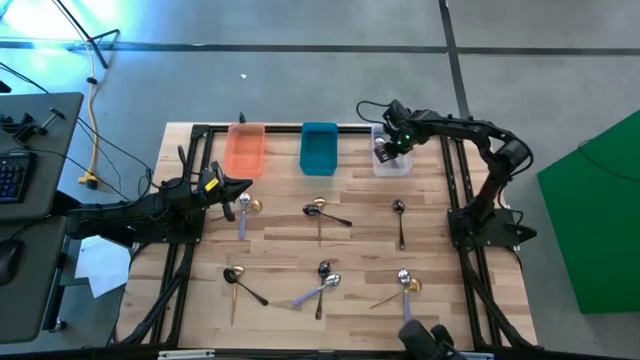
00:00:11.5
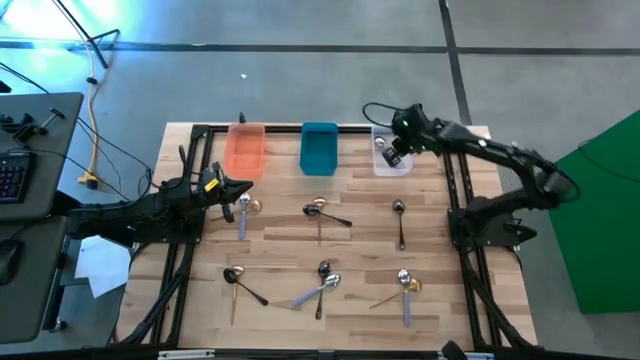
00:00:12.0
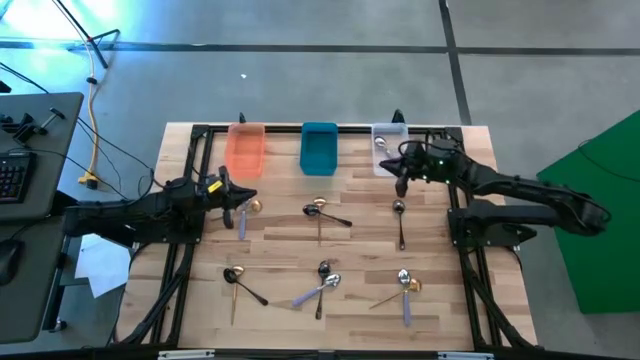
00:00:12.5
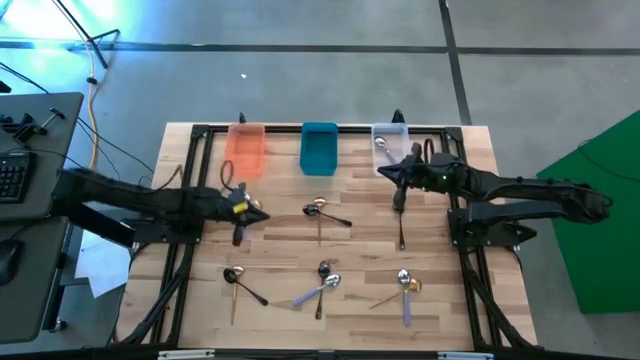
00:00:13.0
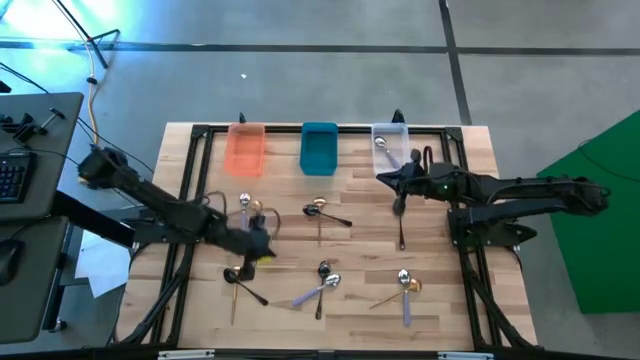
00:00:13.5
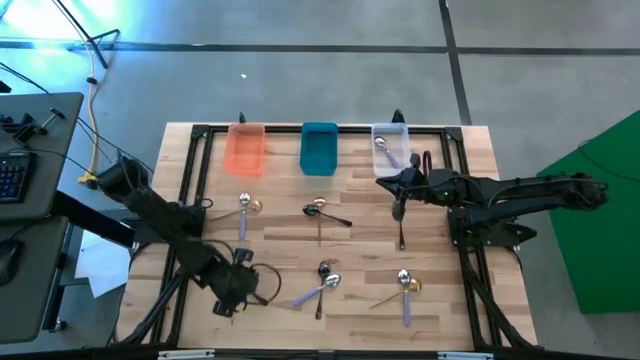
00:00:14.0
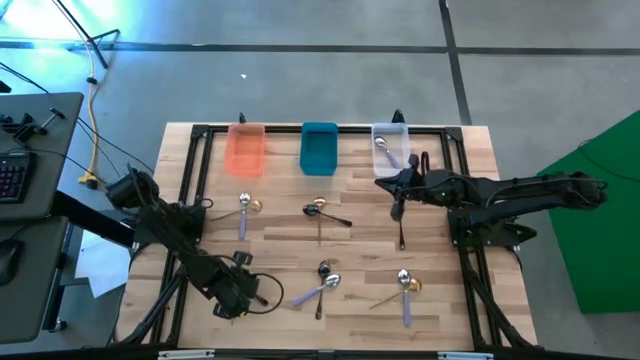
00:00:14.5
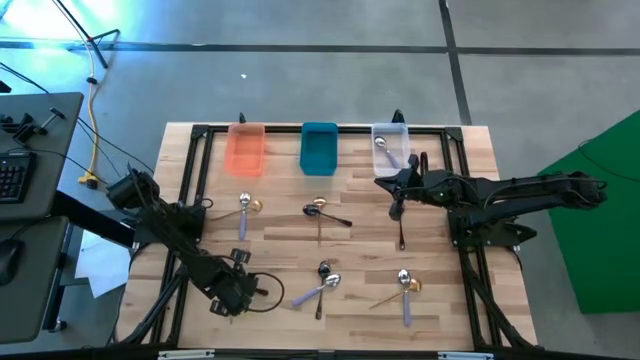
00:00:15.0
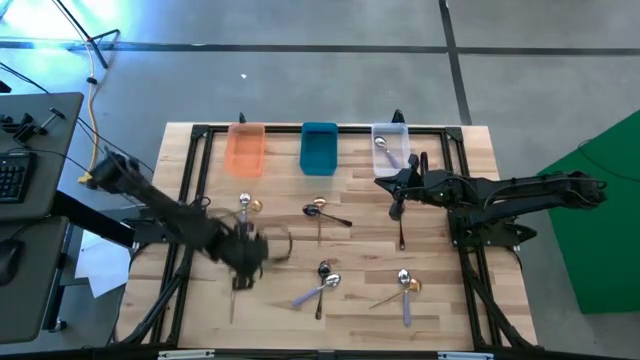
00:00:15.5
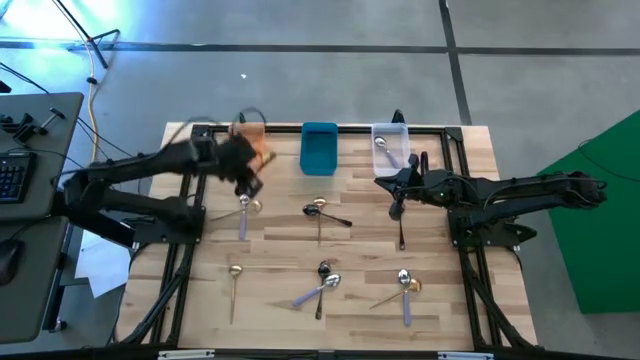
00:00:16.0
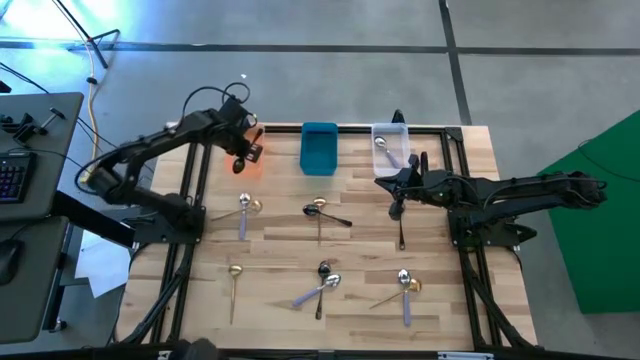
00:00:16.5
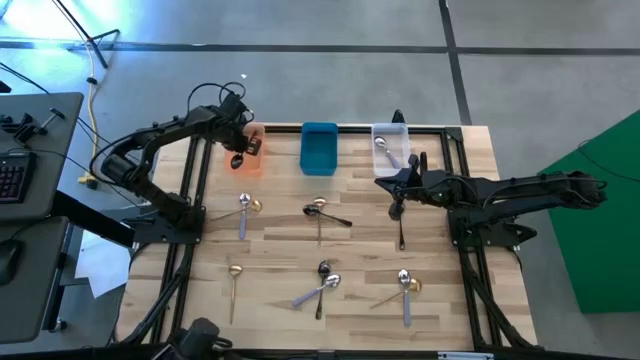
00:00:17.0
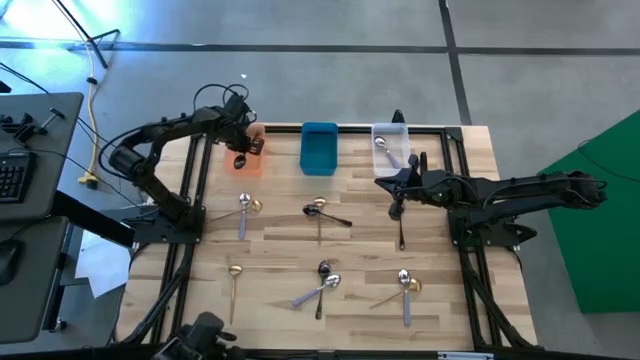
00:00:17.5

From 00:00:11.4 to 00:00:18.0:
Task: Sort silverware by color (type)
Put the bottom left black spoon into the orange bin

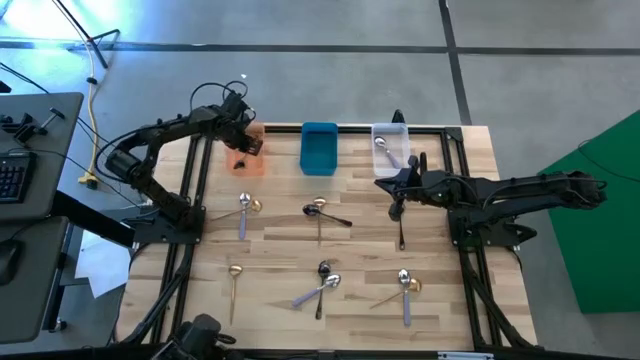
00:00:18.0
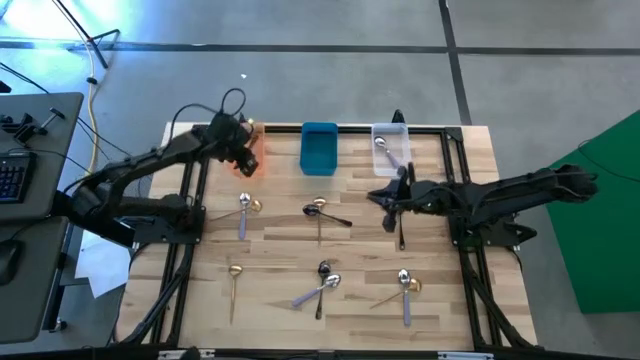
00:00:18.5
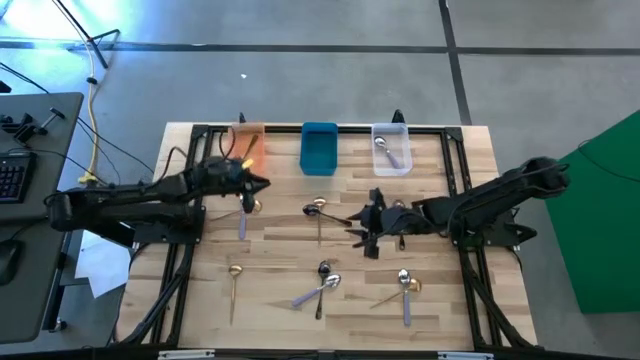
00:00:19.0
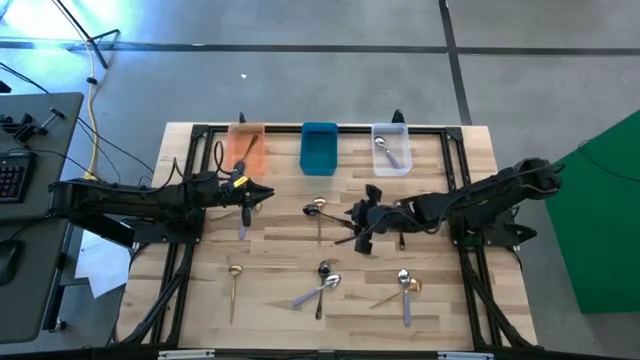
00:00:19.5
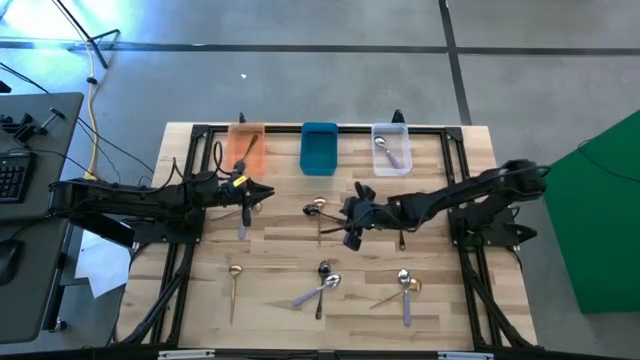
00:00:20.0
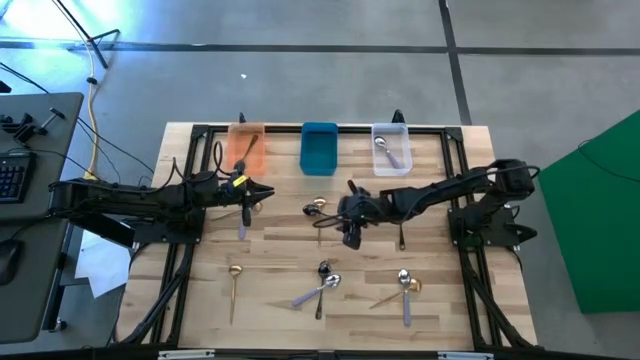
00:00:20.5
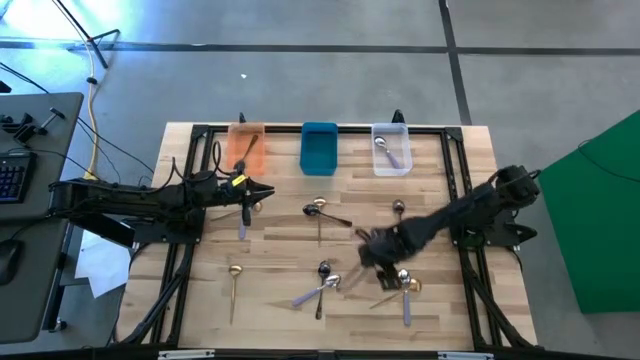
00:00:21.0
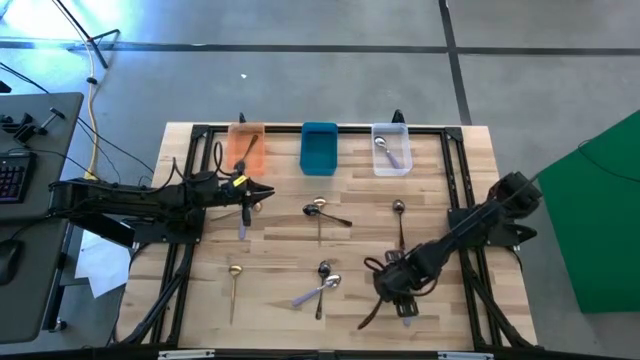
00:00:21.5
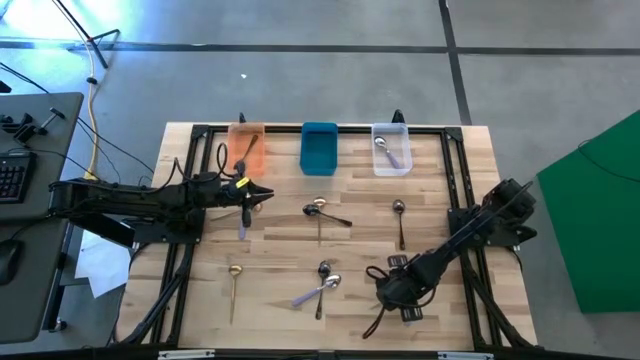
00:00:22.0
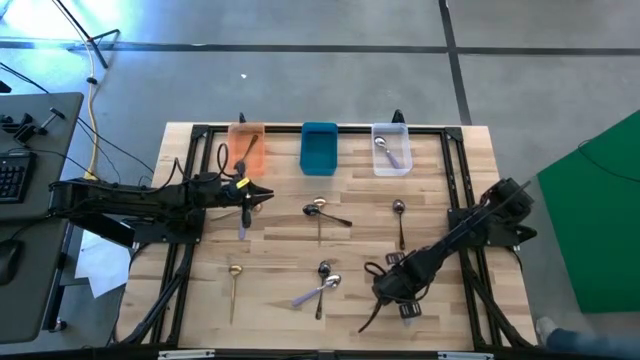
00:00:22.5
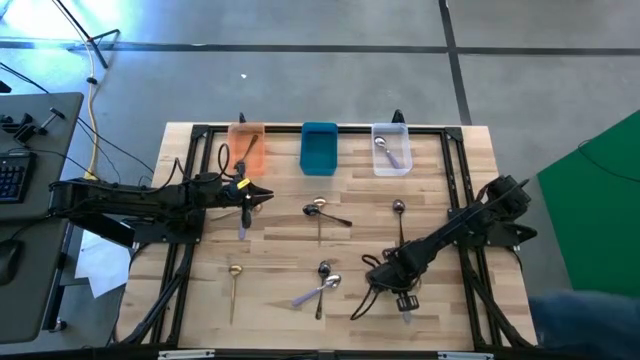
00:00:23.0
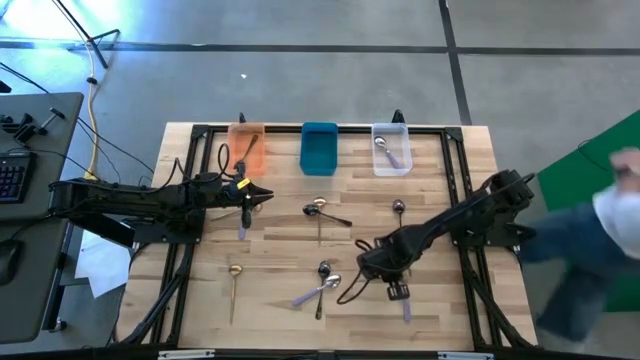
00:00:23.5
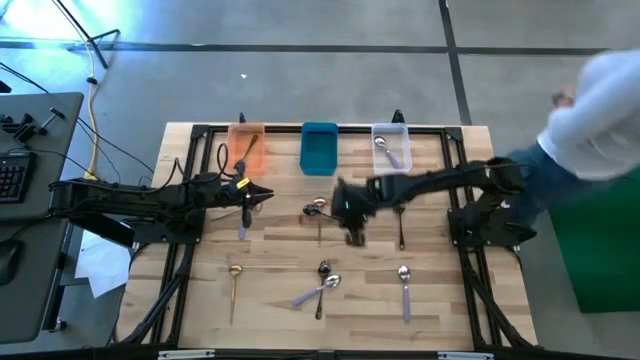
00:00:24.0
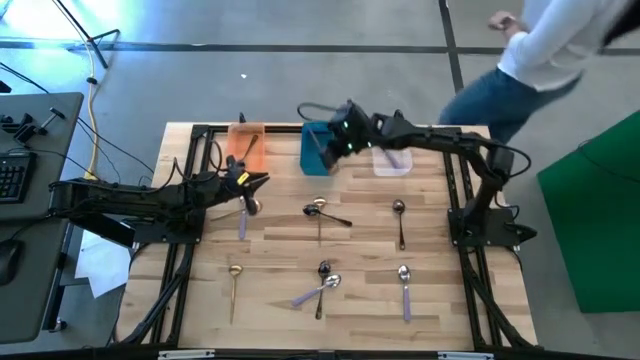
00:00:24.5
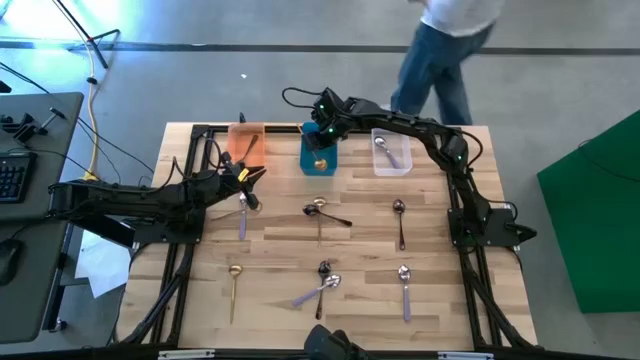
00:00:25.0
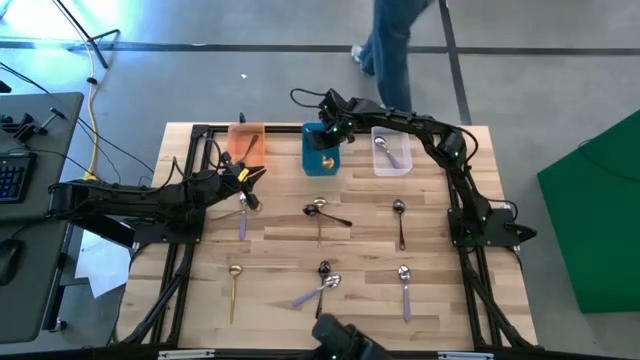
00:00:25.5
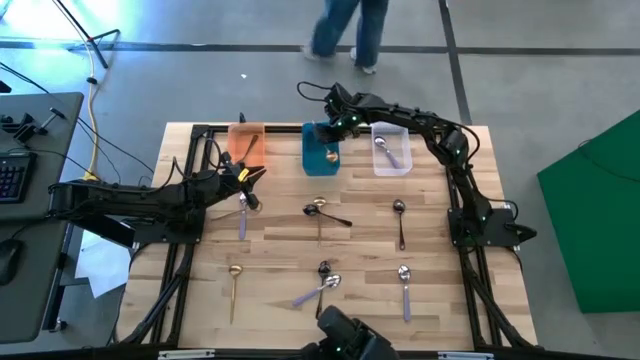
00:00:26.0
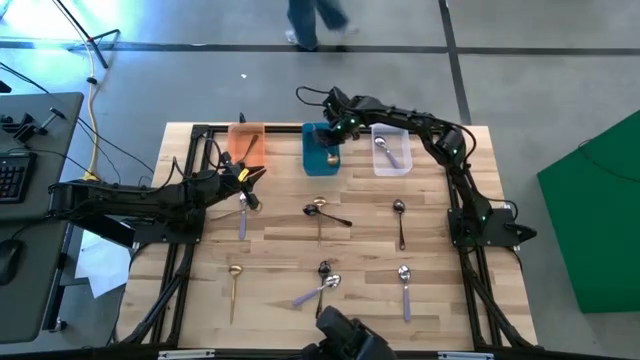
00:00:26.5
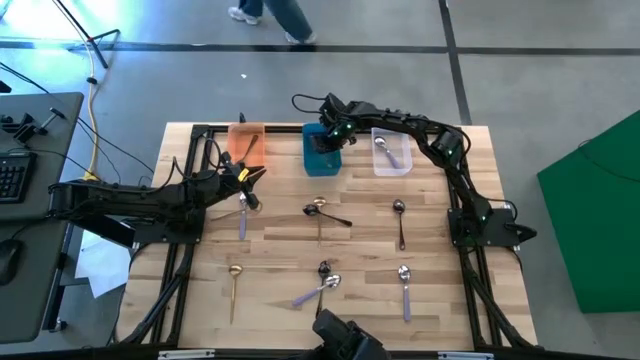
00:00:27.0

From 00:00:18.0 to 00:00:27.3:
Put the bottom right gold spoon into the blue bin

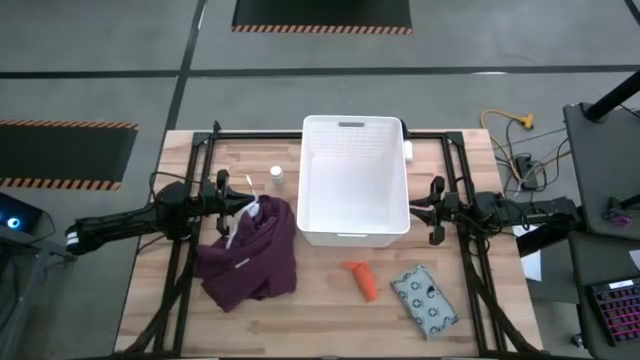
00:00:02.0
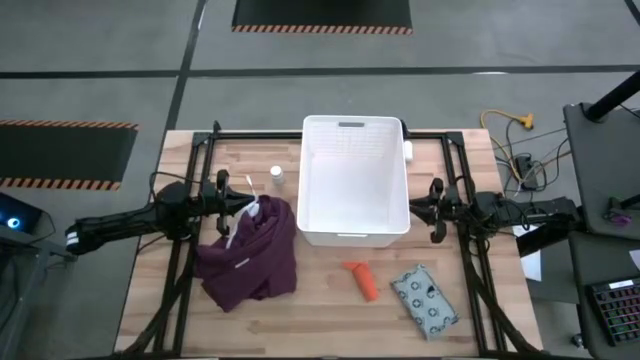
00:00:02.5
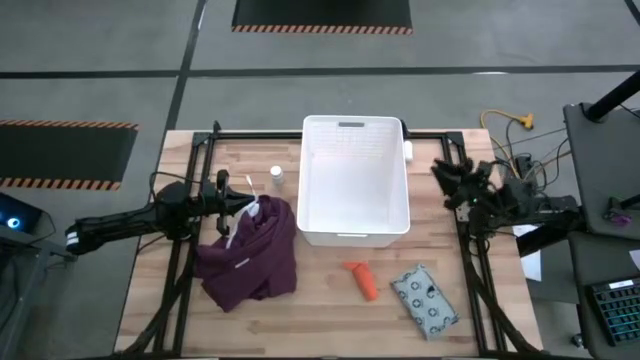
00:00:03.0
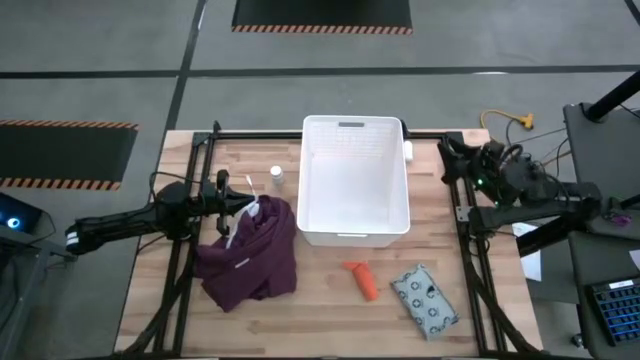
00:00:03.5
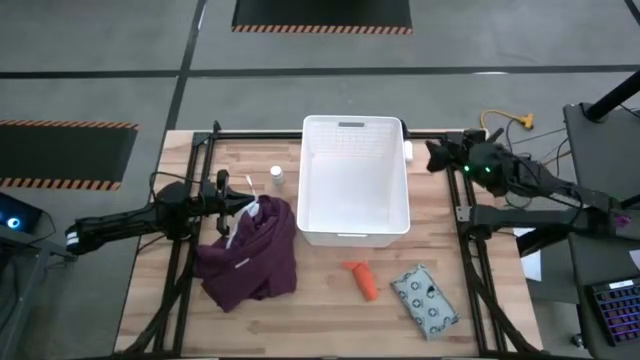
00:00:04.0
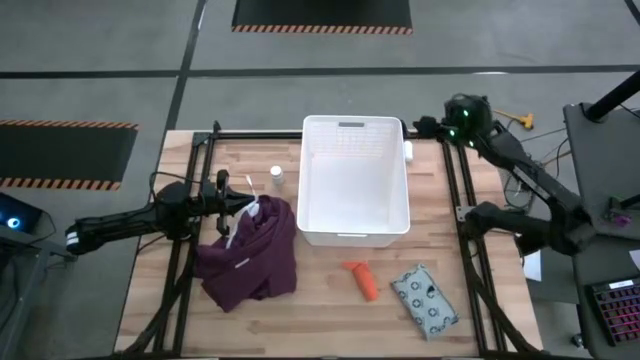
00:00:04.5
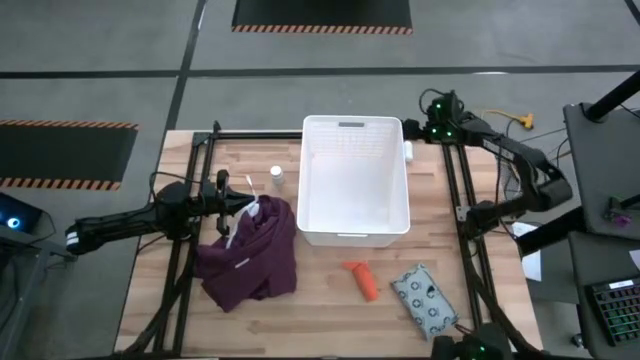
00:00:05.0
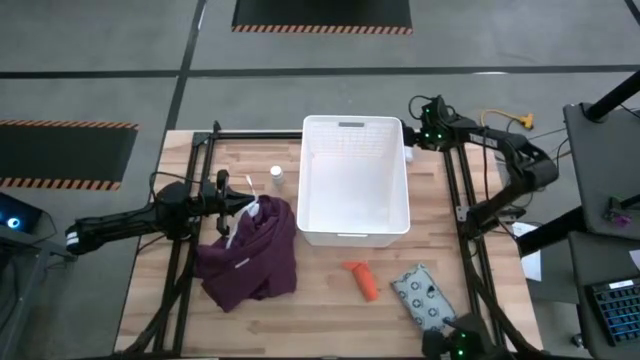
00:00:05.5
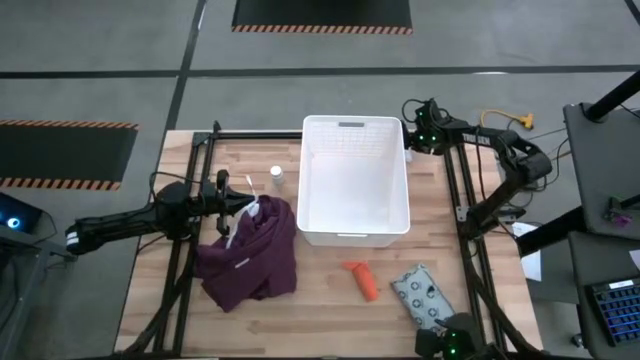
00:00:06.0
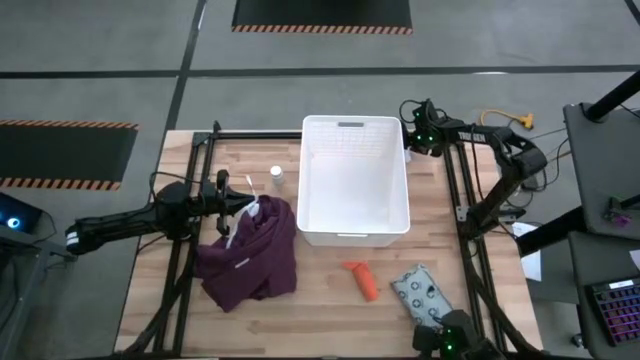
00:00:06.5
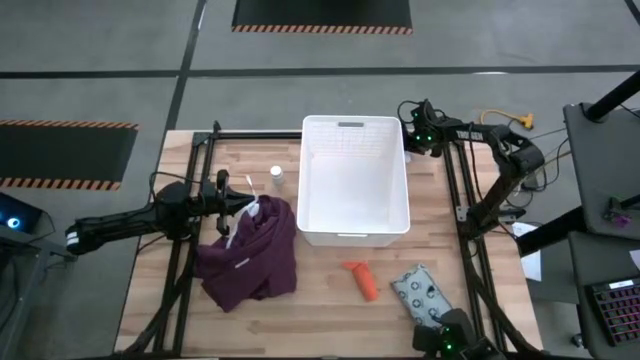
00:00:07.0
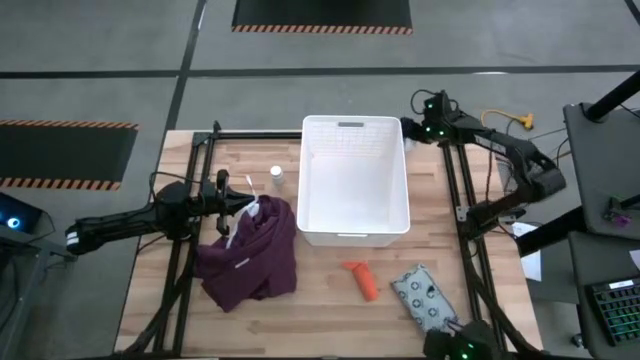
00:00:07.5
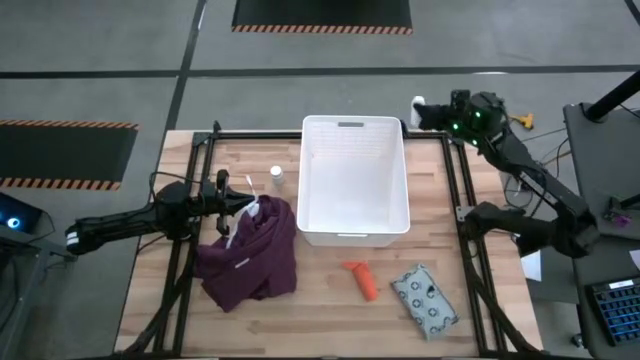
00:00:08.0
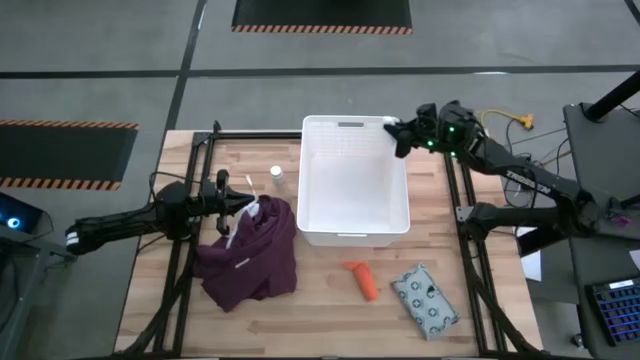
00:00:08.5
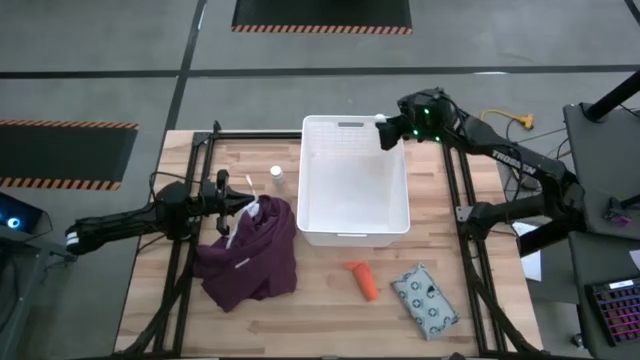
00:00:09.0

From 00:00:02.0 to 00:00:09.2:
Task: Pick & place medical supplies in basket/bin
Put the white bandage into the white bin
